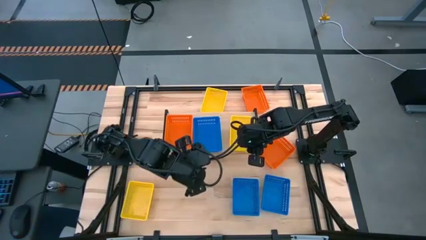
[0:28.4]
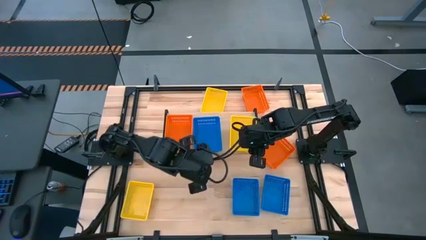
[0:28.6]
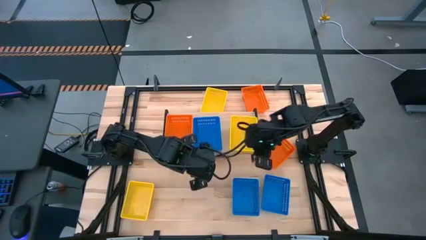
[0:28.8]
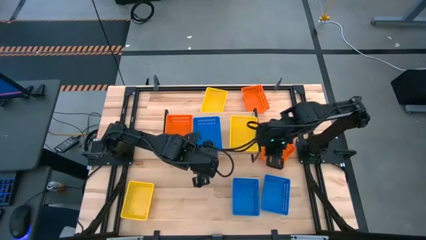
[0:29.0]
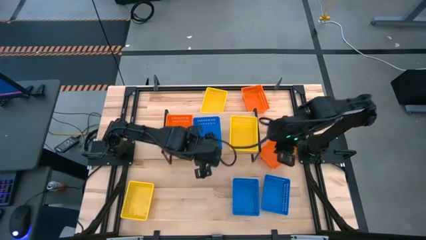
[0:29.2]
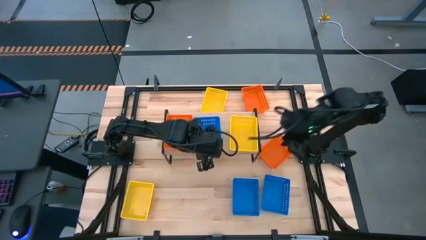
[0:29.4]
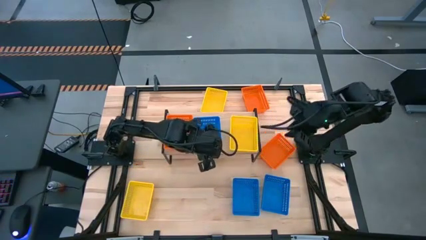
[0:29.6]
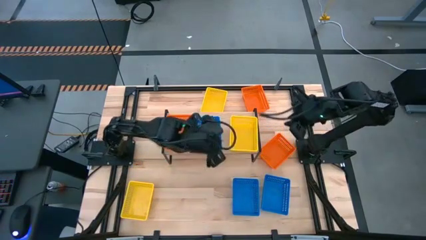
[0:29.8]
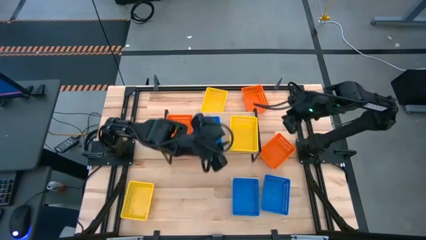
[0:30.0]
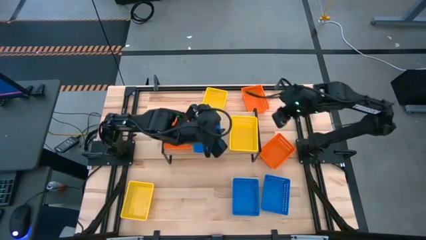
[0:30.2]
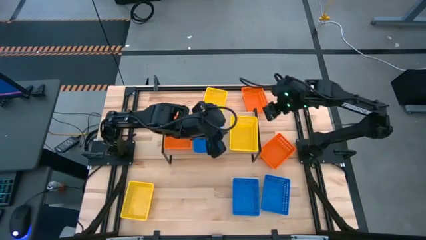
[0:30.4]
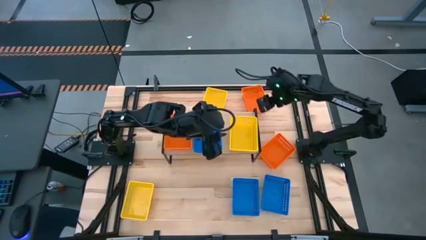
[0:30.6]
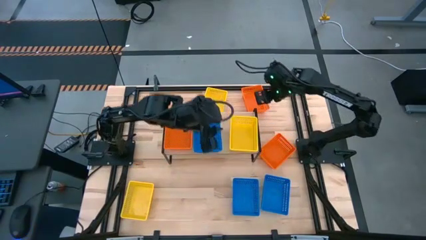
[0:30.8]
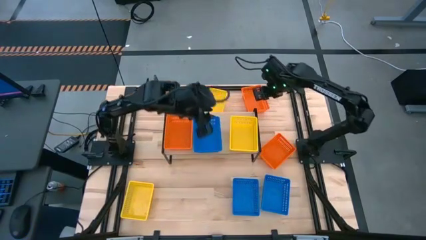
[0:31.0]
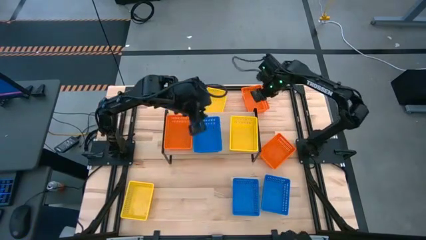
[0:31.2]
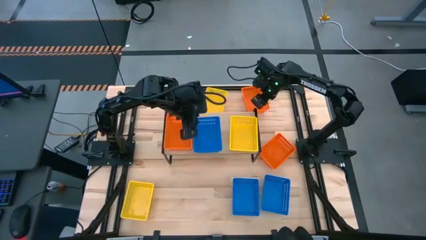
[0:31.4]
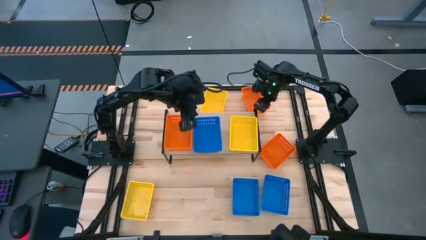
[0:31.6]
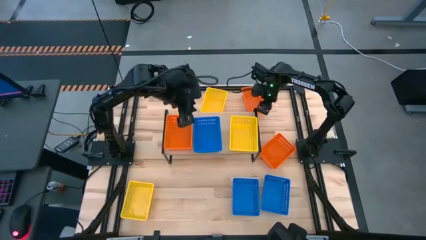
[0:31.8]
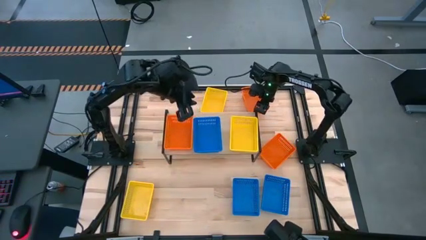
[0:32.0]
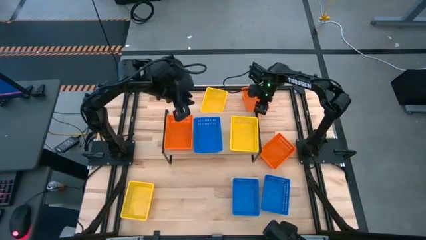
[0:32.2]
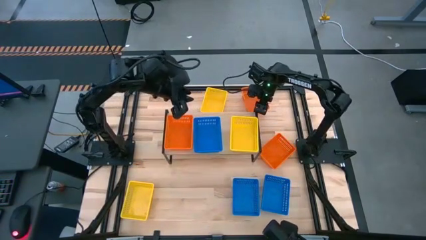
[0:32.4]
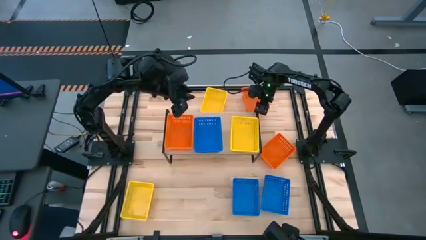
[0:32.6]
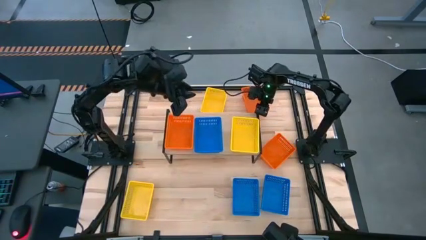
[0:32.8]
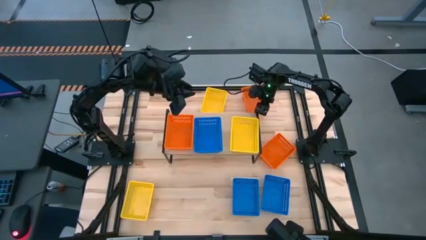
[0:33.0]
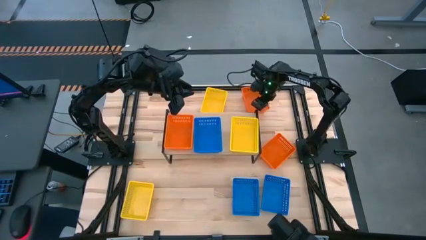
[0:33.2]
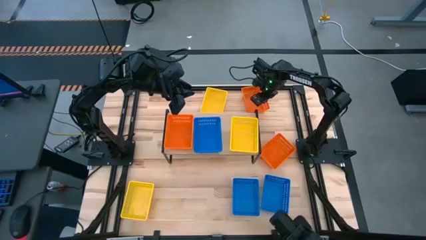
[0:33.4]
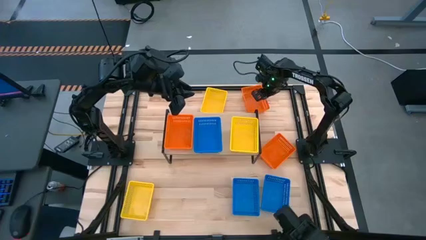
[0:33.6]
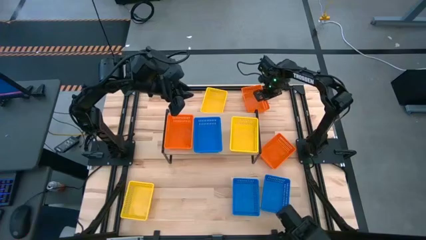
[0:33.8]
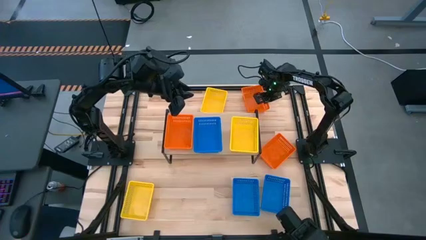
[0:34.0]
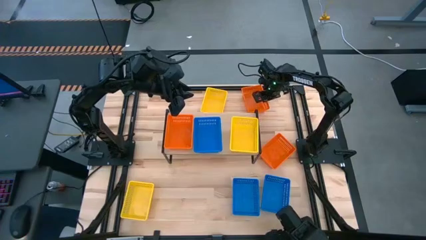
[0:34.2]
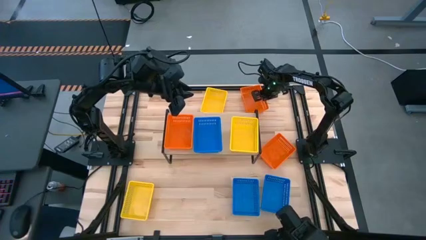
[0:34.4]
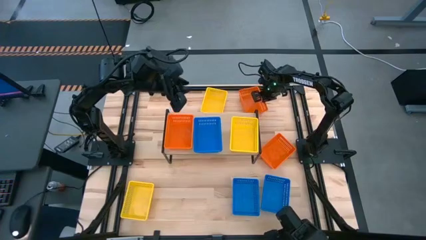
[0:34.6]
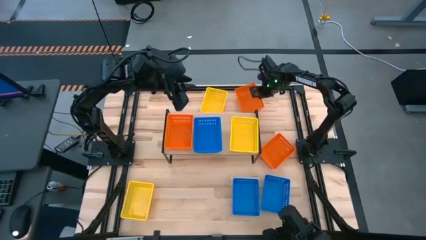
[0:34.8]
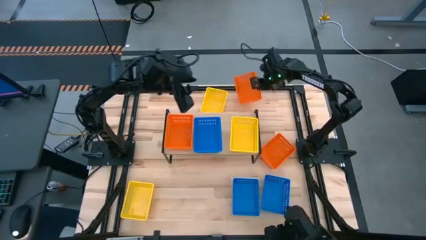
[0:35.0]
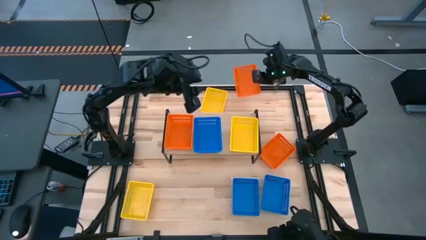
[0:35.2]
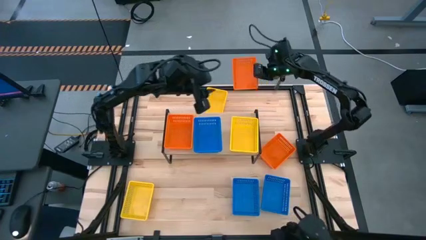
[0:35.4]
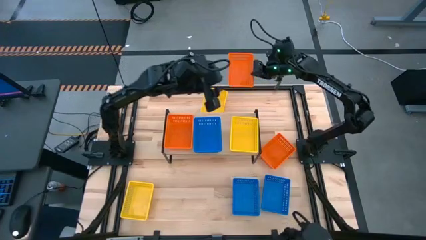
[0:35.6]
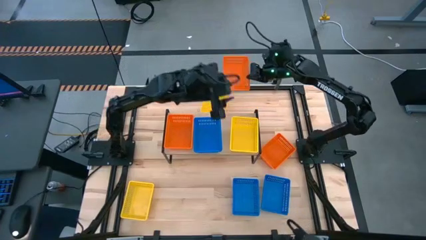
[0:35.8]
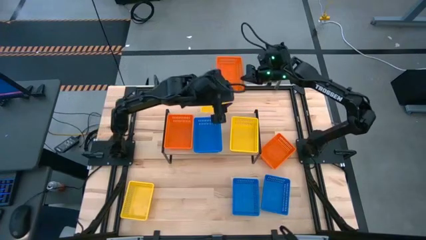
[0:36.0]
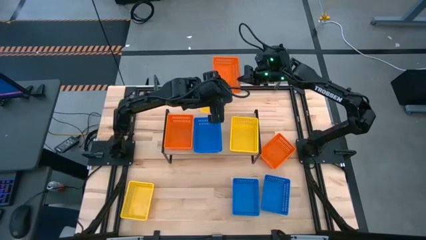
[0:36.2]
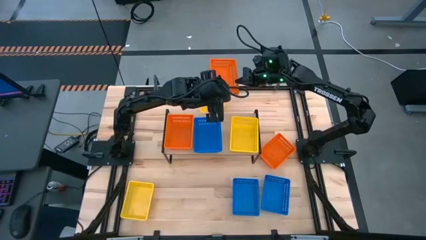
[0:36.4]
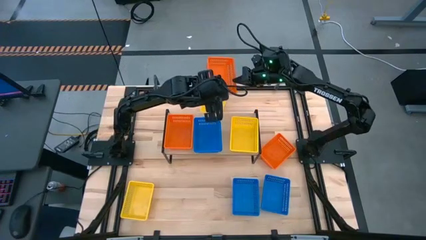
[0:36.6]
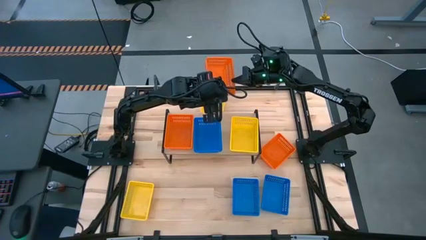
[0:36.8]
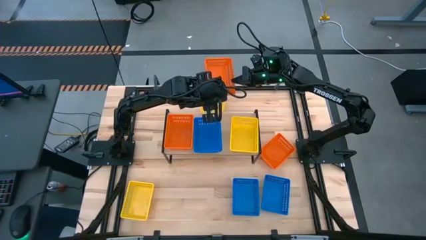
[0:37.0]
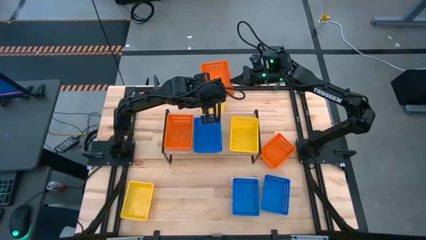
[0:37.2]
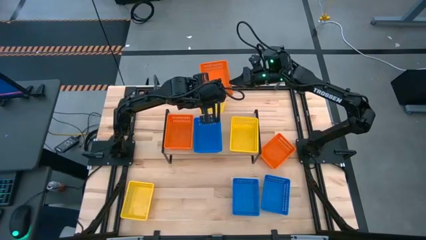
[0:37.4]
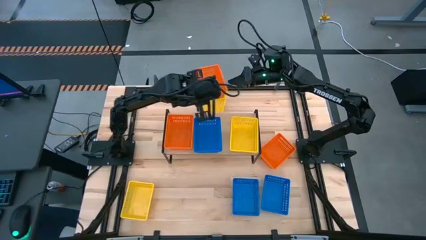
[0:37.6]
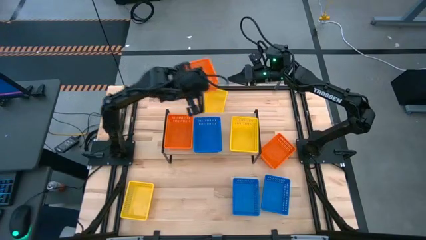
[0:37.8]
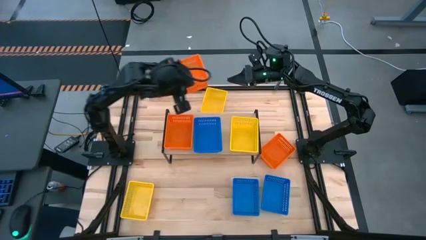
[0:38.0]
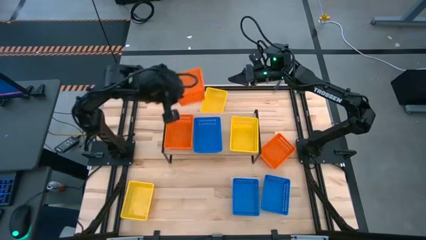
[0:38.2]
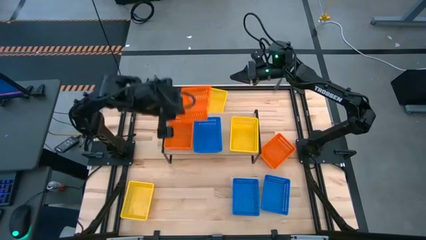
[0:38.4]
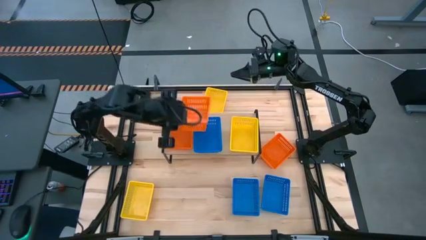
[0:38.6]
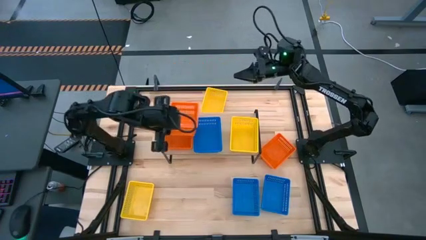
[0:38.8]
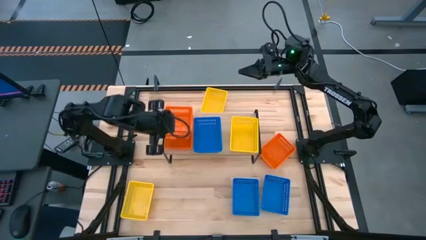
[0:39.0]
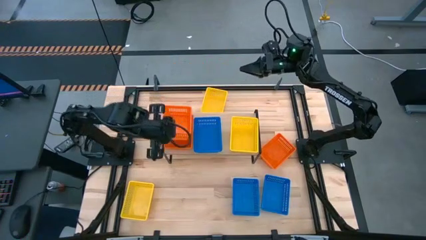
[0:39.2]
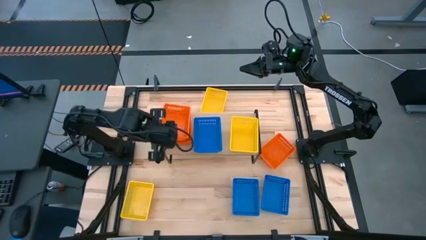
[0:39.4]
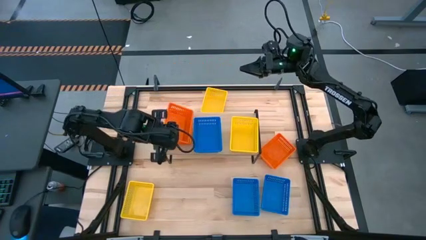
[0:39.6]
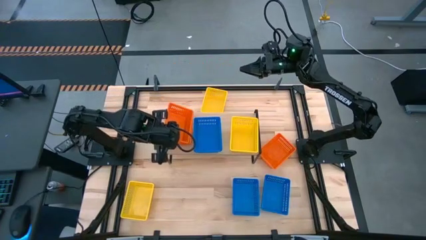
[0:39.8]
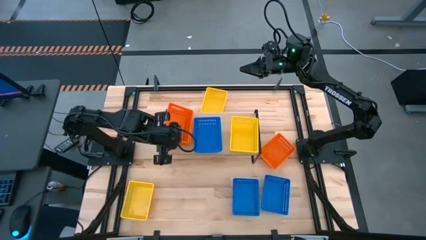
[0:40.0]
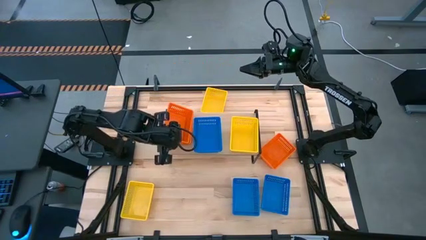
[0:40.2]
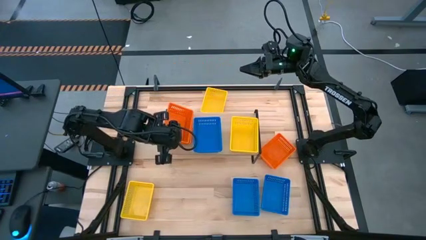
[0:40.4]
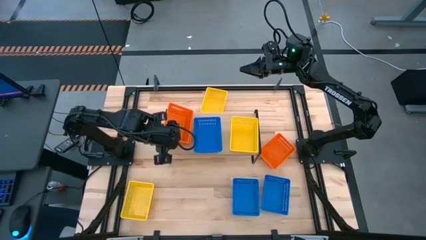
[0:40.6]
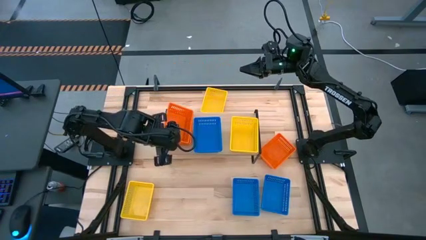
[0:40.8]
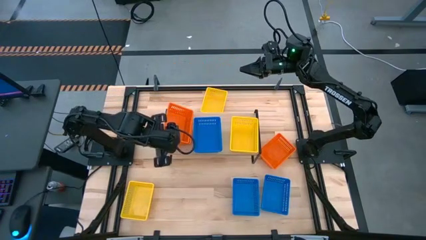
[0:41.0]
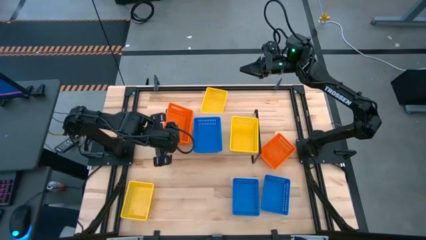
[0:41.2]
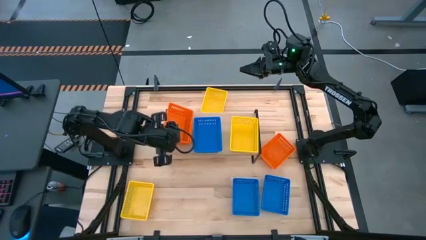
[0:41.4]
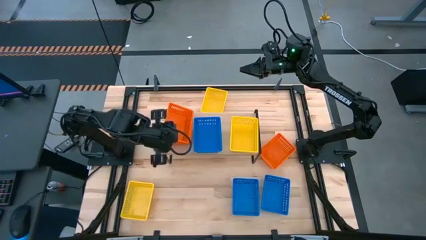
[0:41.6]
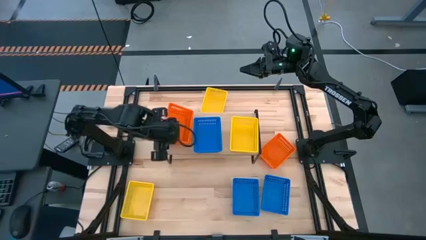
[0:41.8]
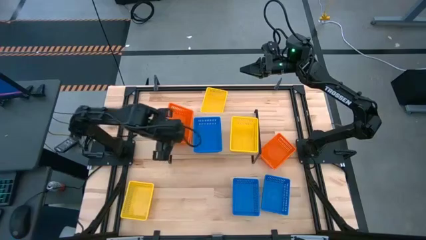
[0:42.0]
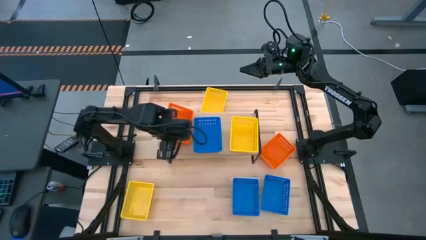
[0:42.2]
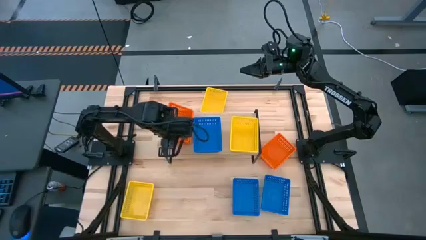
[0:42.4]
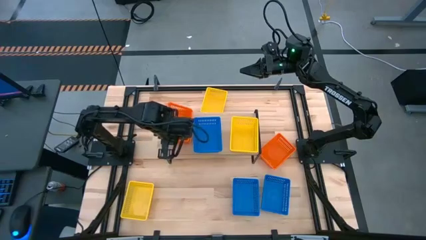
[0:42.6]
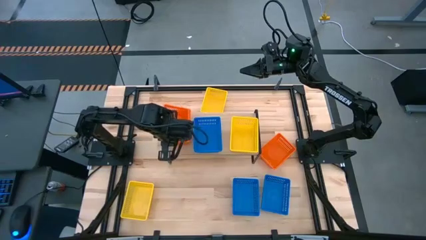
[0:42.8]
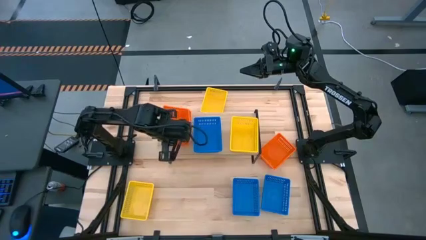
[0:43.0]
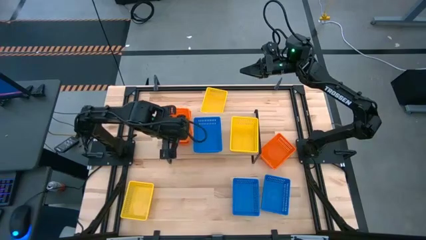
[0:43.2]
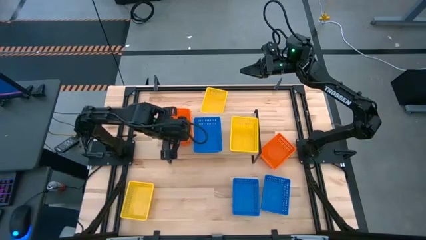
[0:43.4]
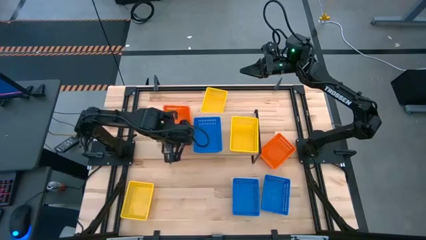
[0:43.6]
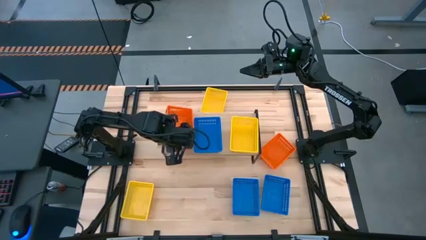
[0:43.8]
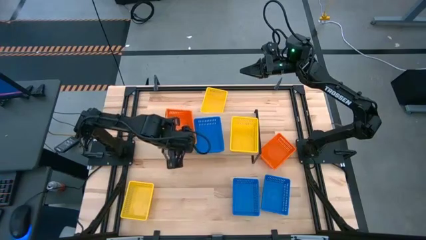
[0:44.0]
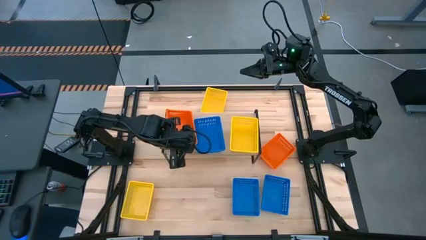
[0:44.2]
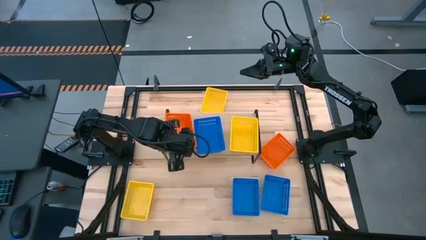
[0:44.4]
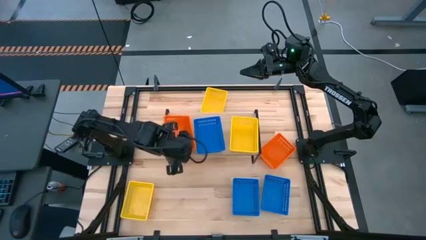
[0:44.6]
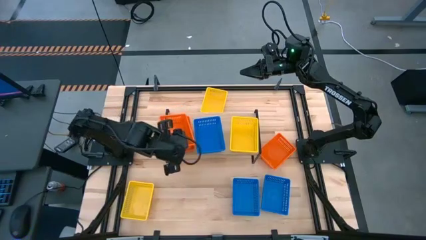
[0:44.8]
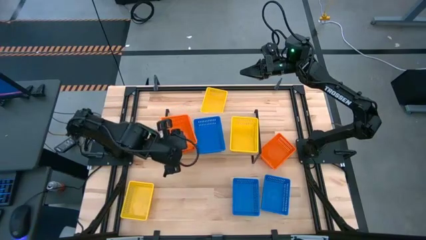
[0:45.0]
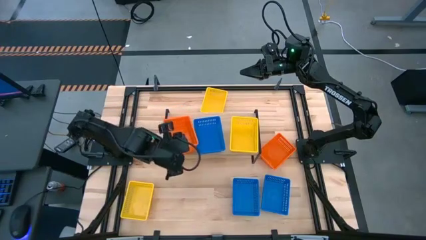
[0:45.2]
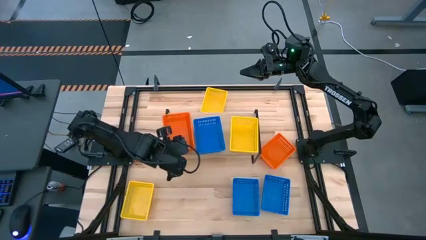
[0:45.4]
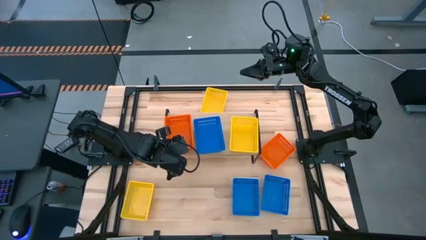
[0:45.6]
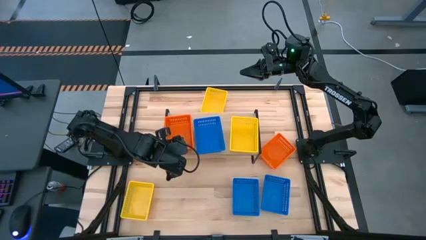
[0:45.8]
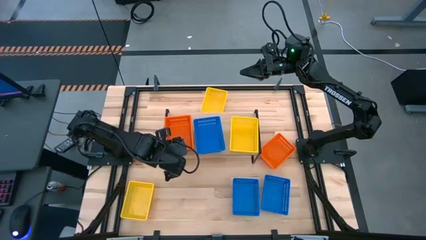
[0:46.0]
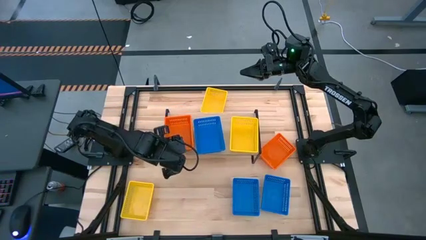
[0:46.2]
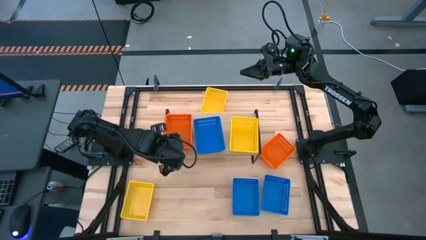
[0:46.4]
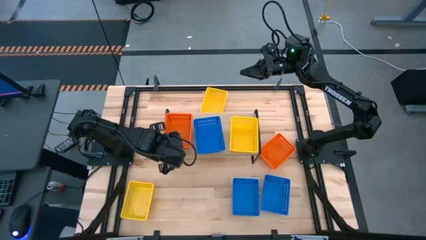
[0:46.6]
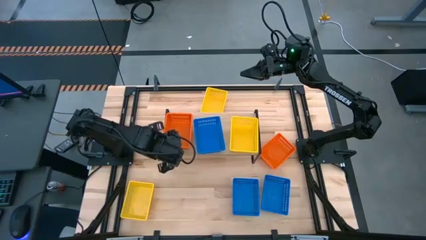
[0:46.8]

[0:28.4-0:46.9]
Task: Stack baskets on shelf by color
Stack the top orange bin on top of the orange bin on the shelf
